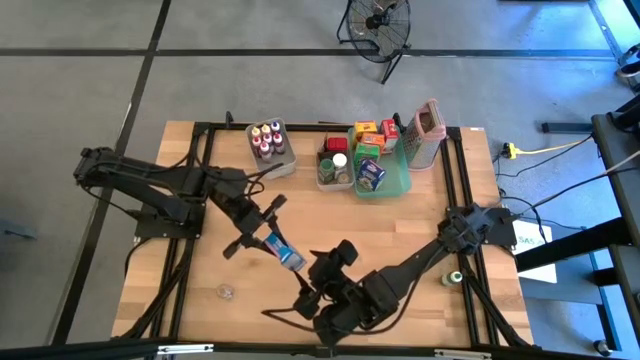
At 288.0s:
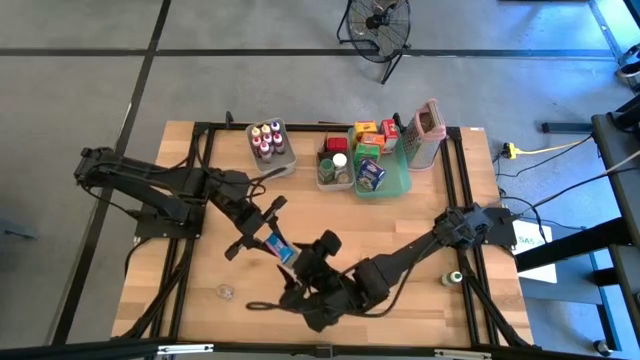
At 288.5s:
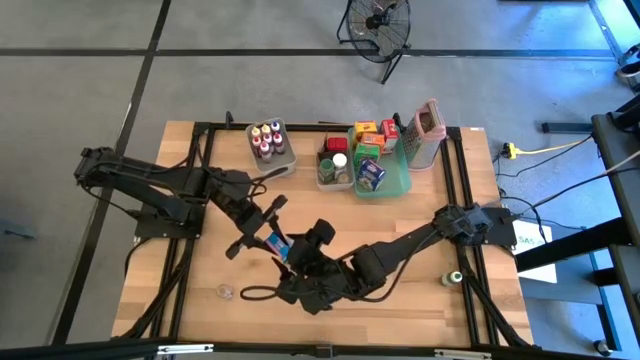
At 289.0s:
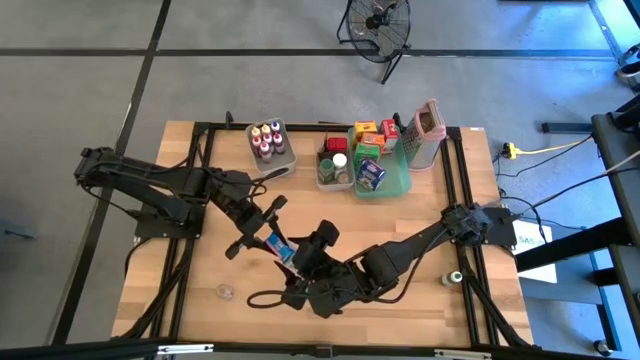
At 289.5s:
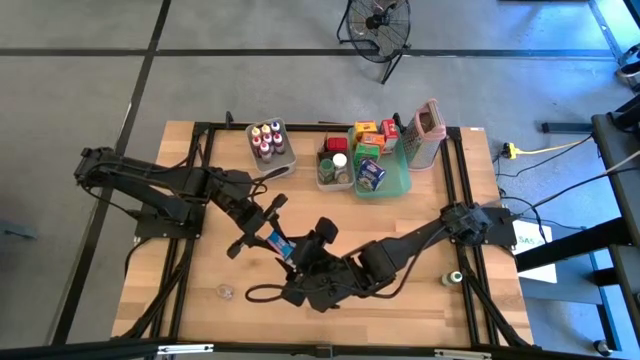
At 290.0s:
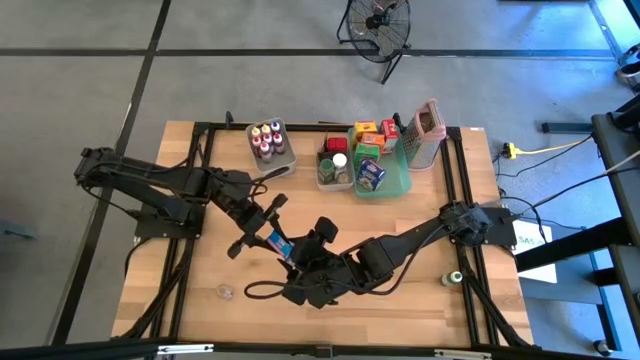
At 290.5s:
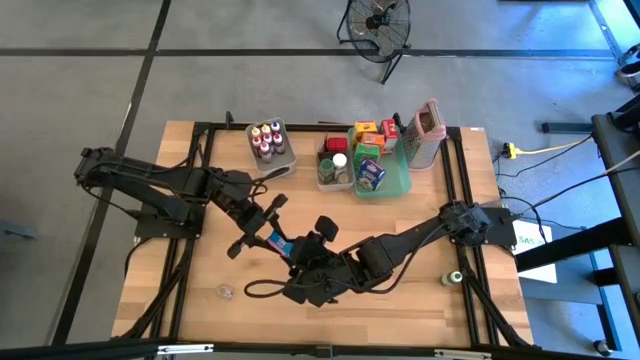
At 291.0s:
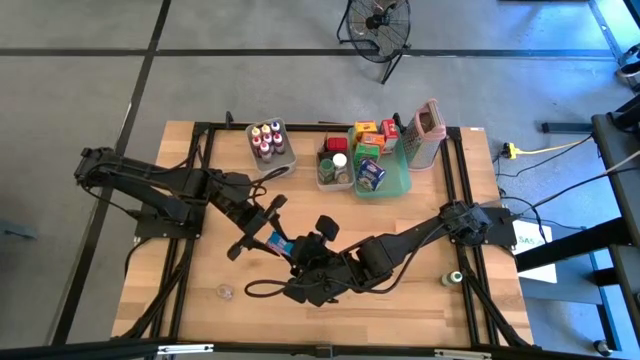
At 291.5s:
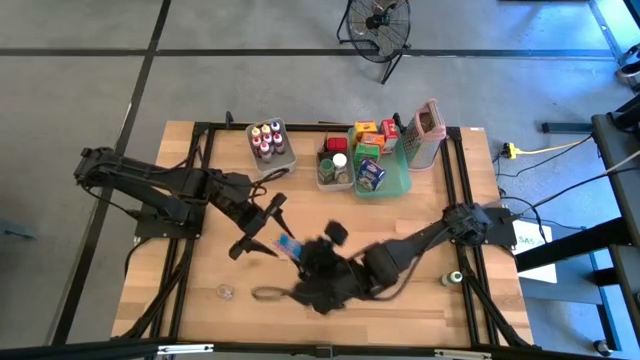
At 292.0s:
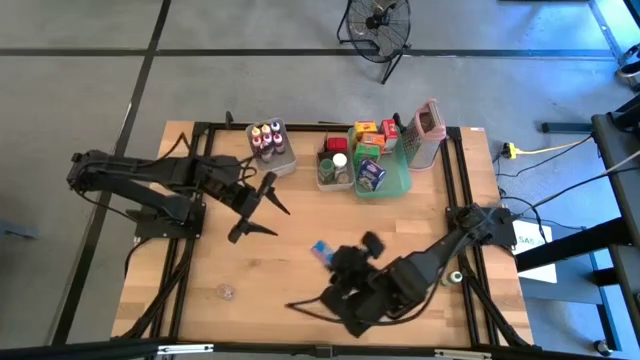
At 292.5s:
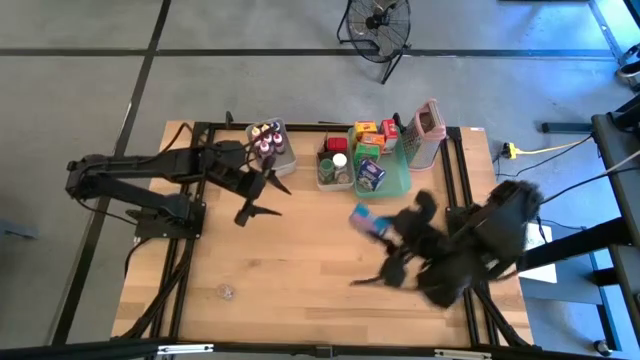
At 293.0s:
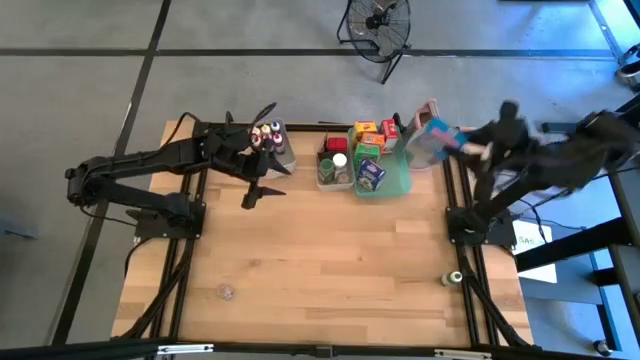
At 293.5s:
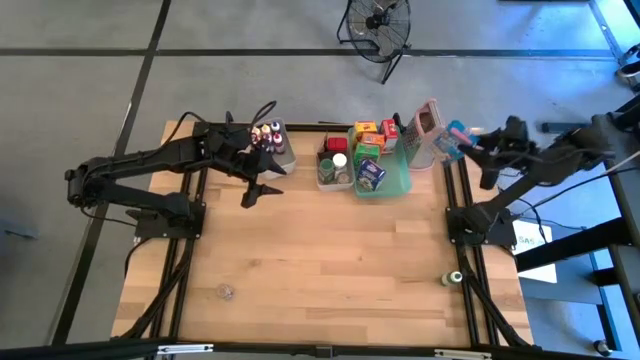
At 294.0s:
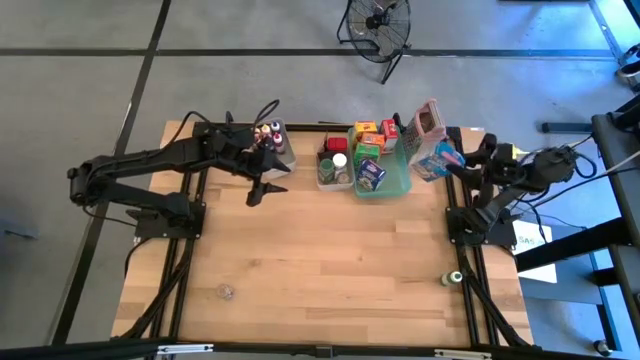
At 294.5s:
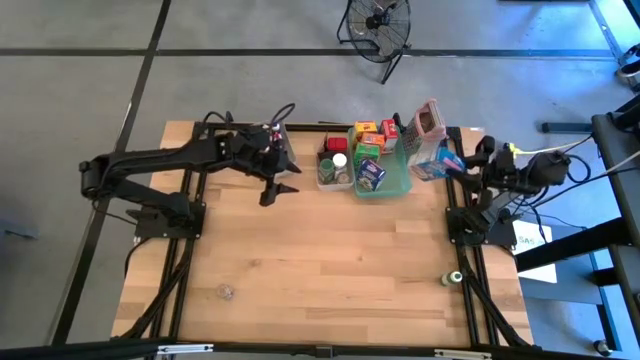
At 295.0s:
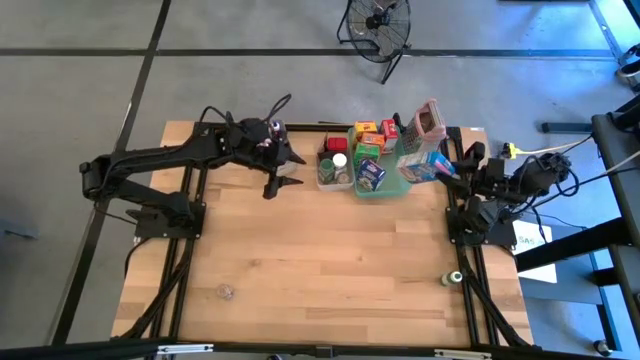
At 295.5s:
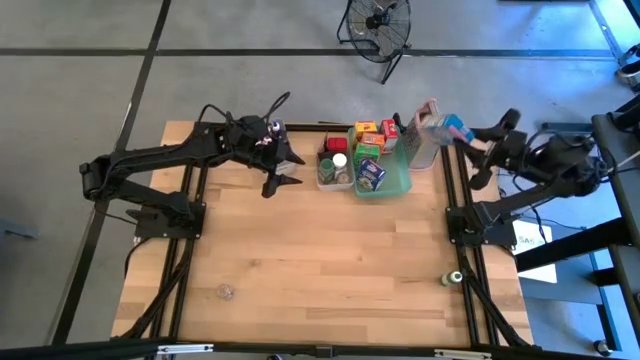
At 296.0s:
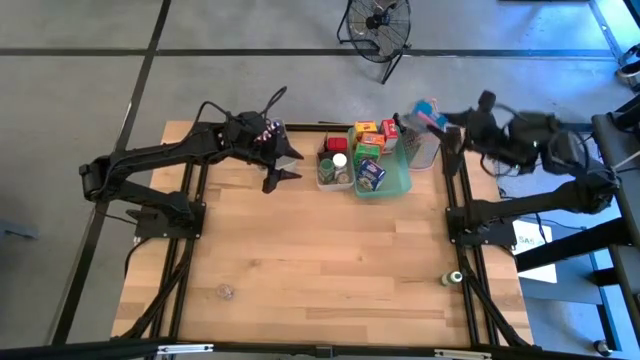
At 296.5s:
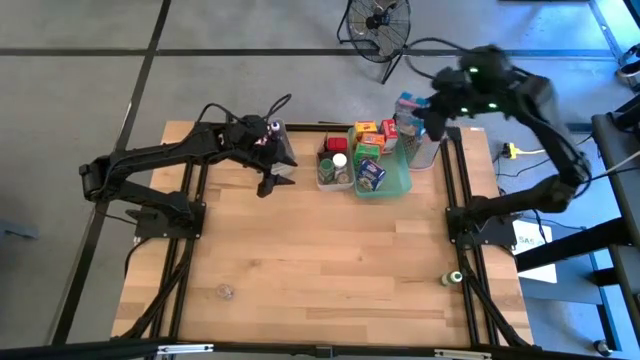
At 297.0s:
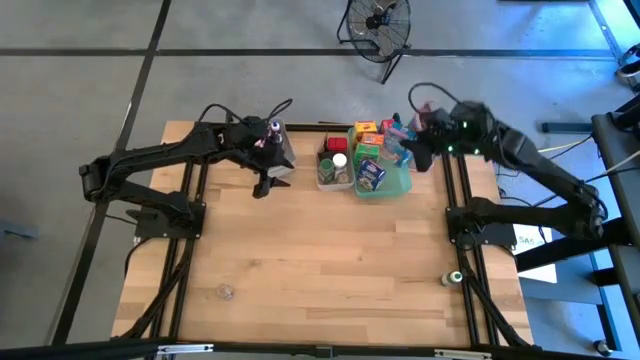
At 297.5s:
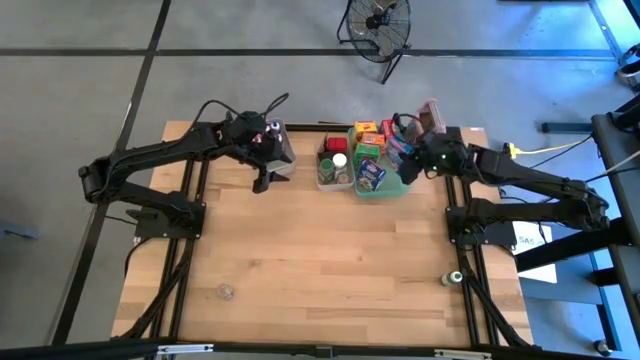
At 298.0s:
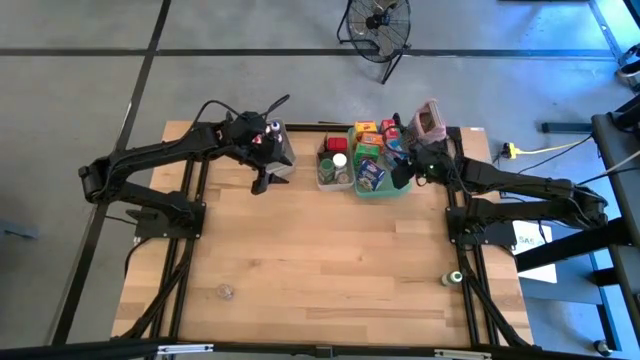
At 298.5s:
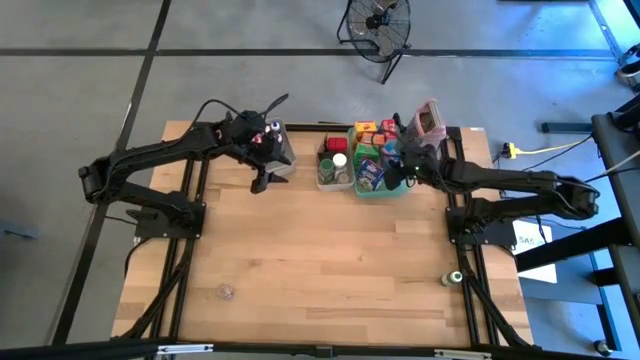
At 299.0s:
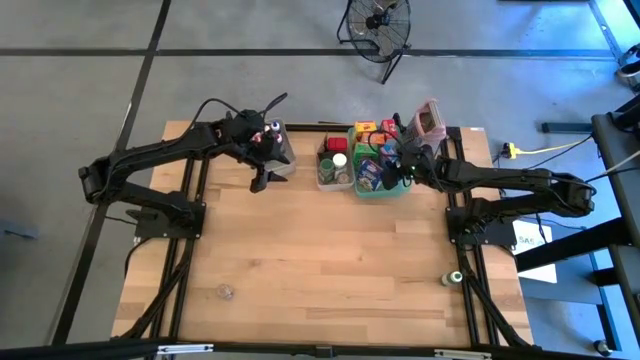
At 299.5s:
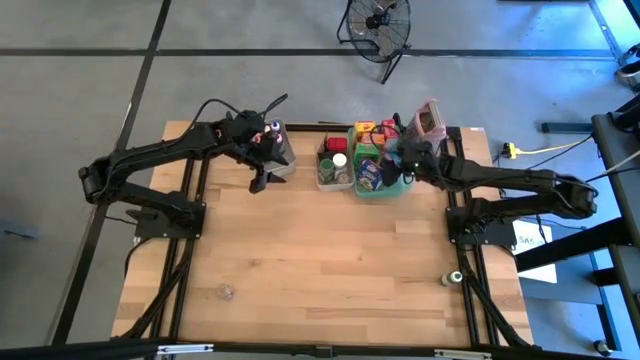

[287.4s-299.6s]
Task: Pick & Place Kitchen Items
Put the light blue cereal box into the green bin

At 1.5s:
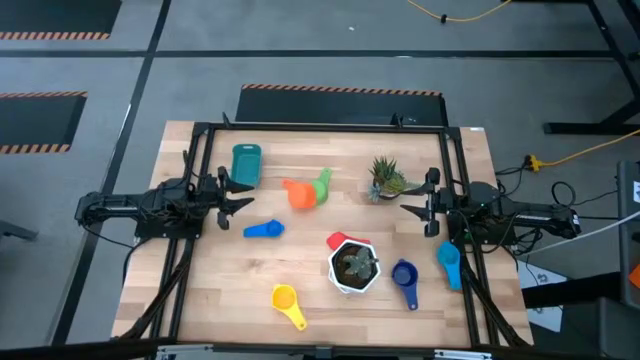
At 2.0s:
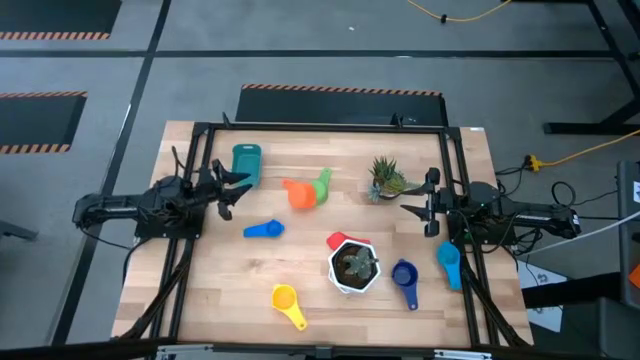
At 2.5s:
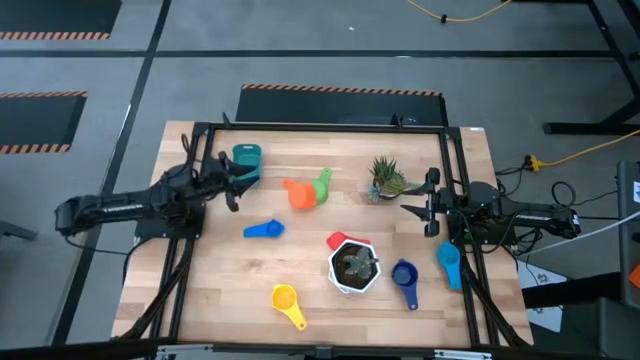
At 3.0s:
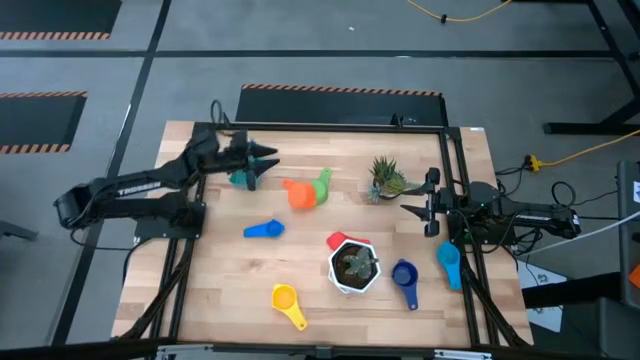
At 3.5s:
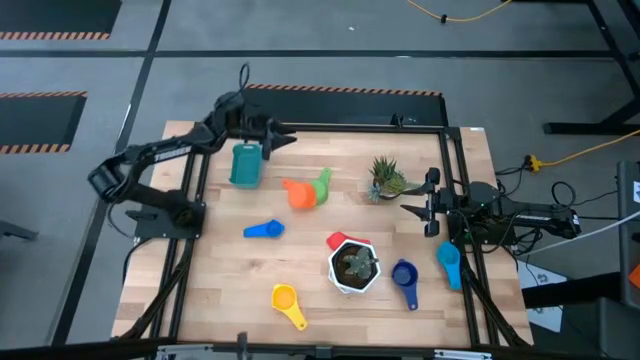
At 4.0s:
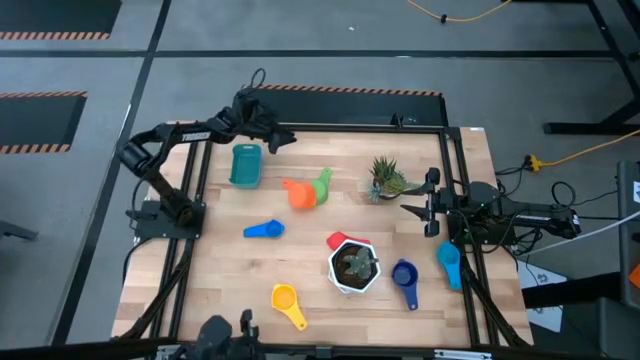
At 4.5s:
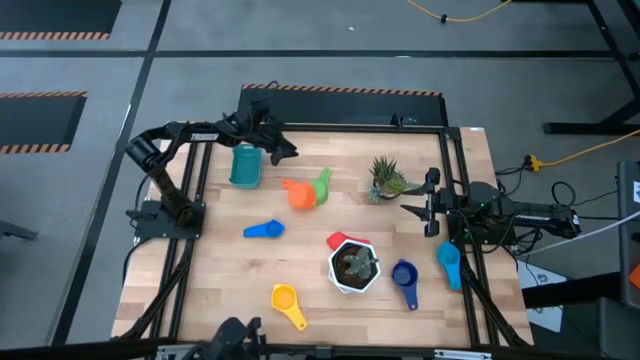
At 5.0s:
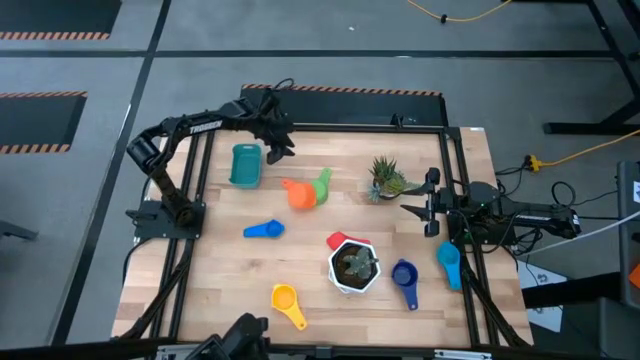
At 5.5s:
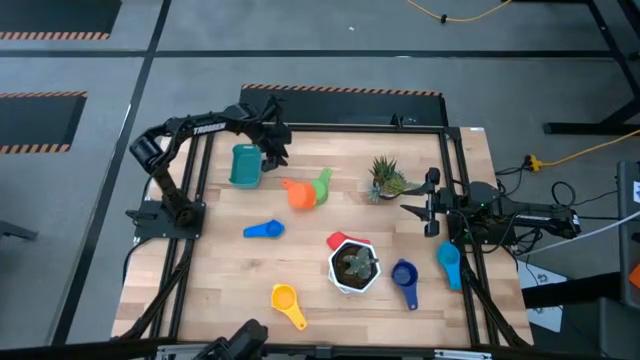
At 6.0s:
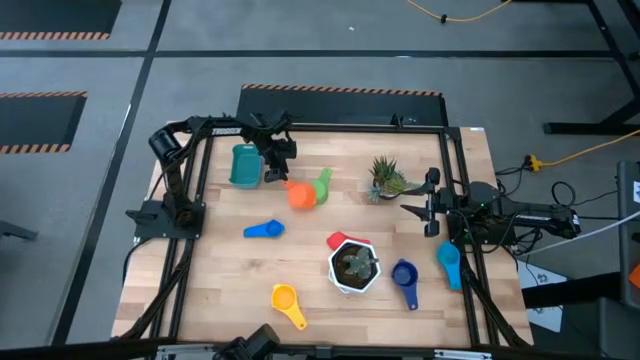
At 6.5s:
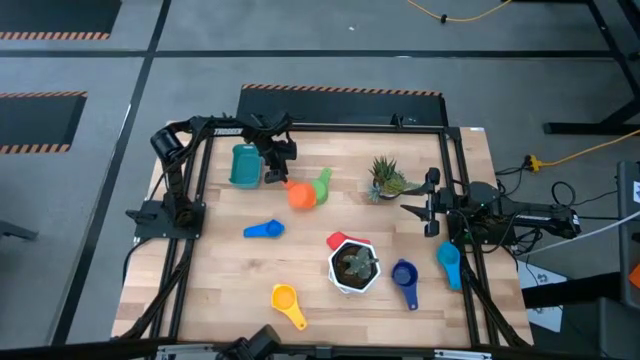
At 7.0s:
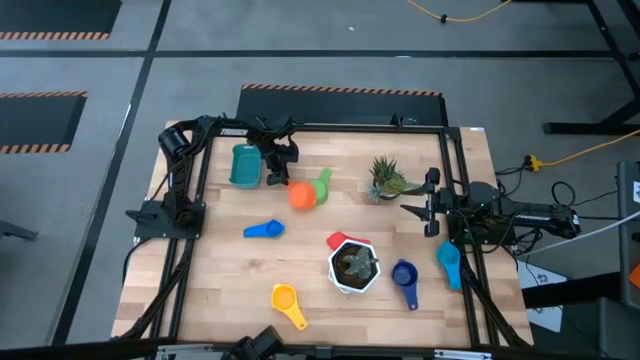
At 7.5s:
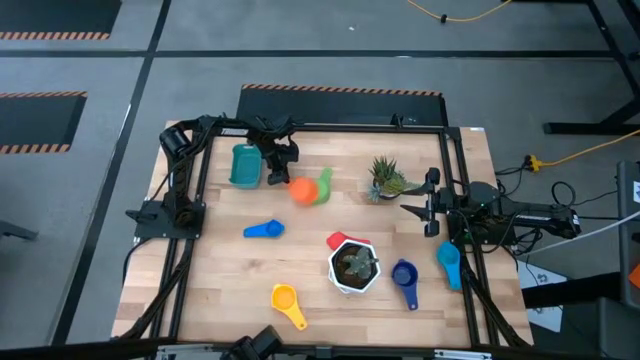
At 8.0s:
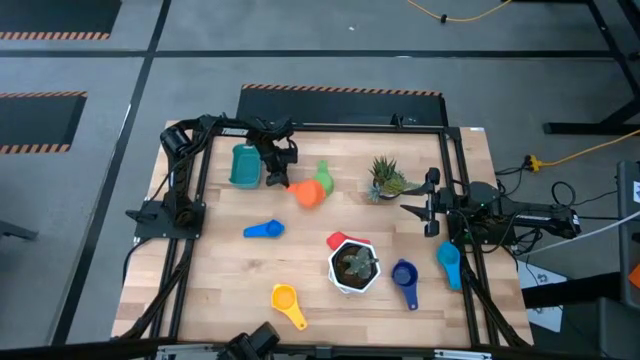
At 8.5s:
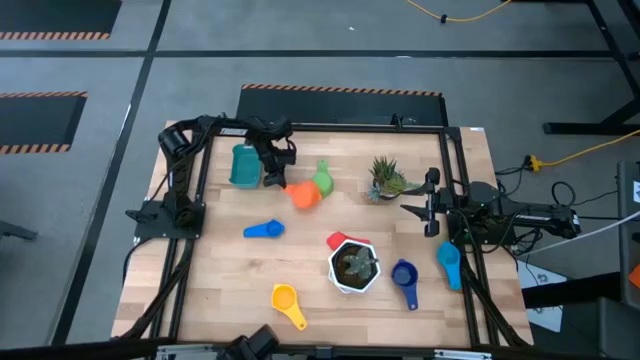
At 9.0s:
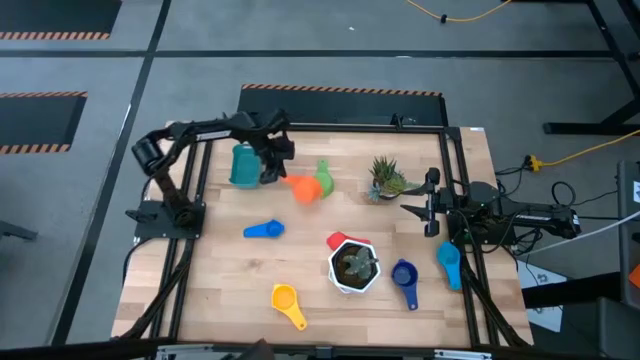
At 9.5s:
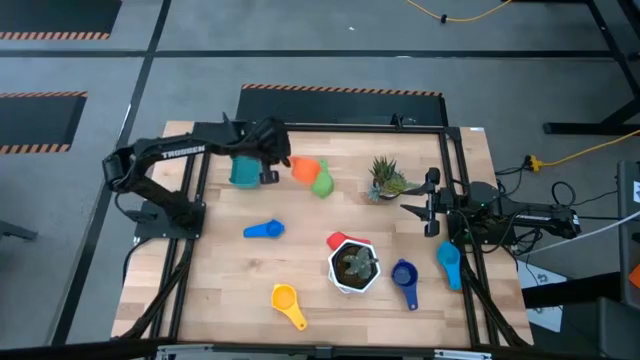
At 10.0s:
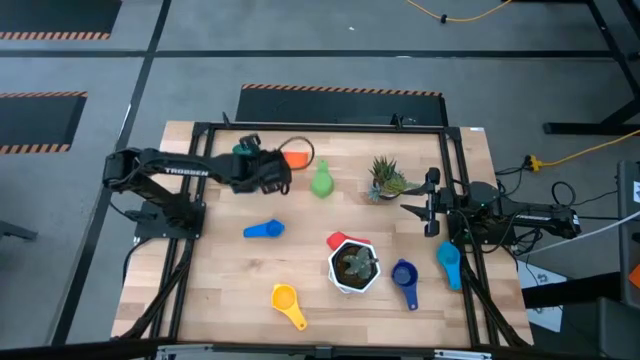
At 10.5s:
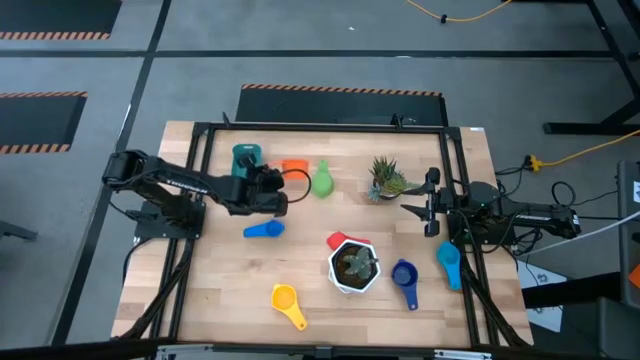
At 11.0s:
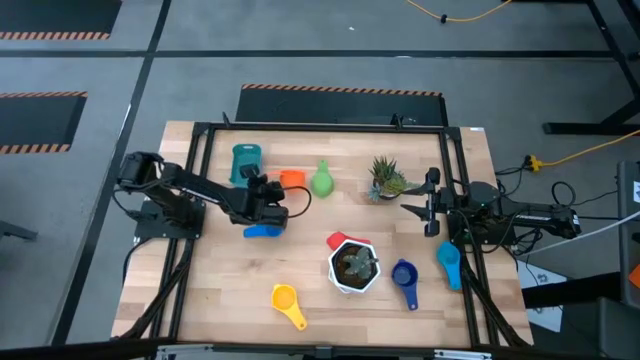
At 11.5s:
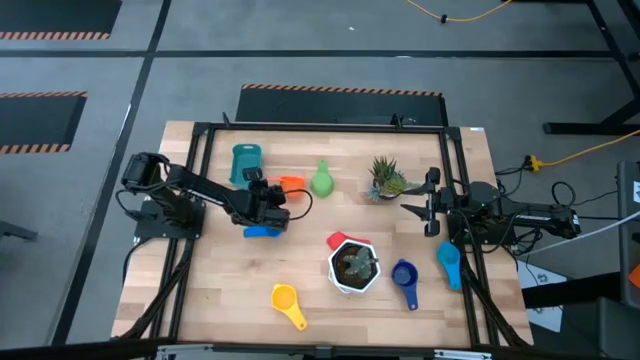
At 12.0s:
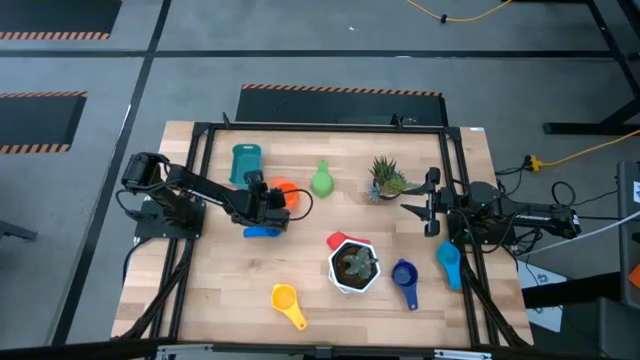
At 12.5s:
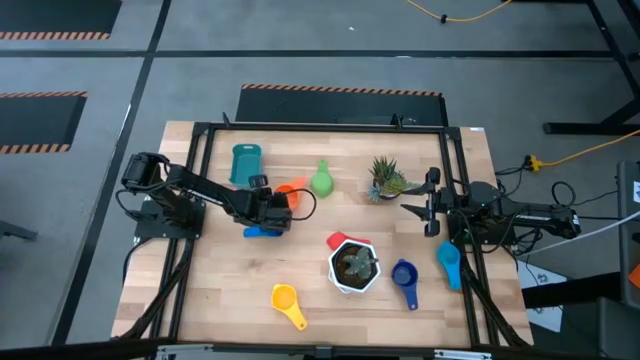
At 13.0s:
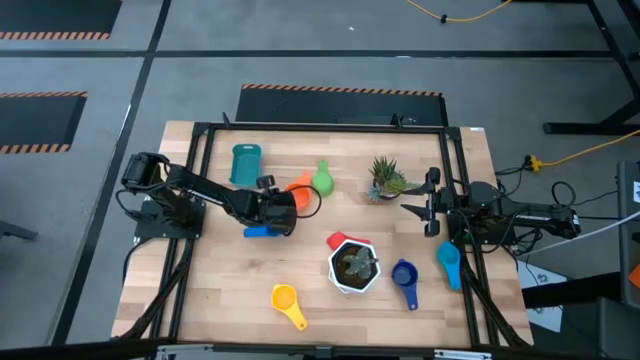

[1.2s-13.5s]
Task: Nest measuring cups in basket
Prepare the orange measuring cup to an upright position
